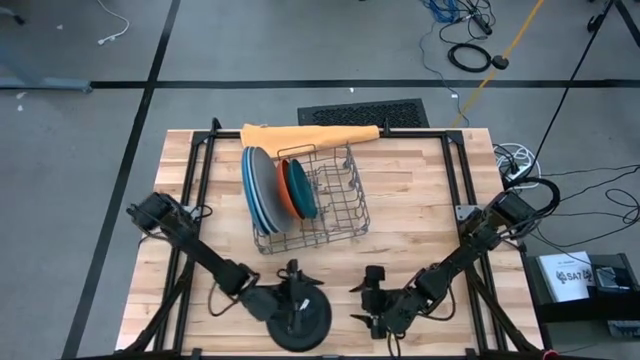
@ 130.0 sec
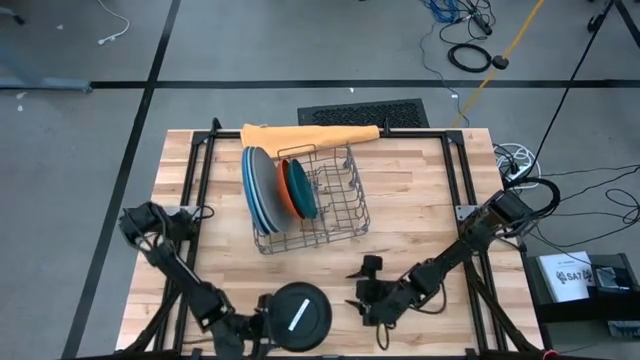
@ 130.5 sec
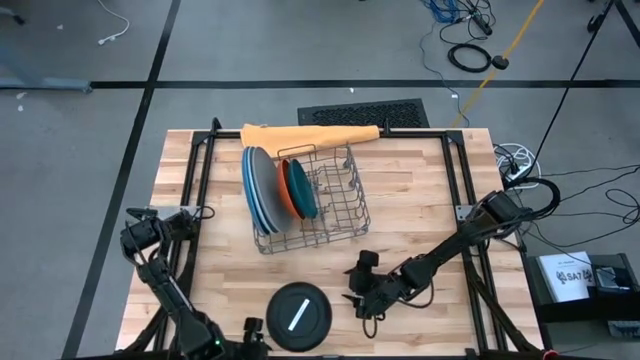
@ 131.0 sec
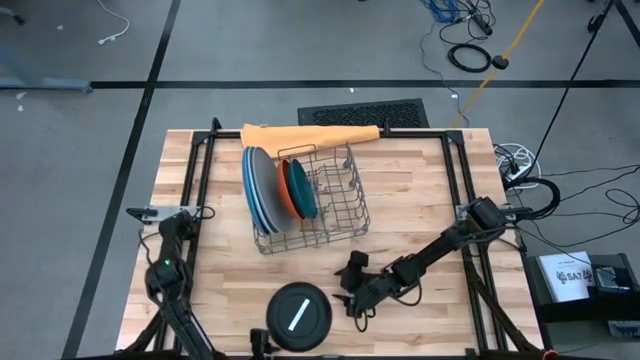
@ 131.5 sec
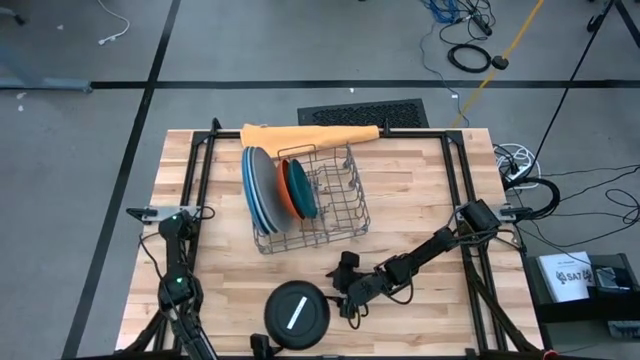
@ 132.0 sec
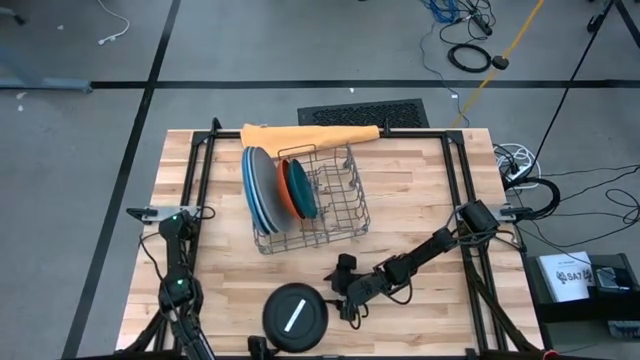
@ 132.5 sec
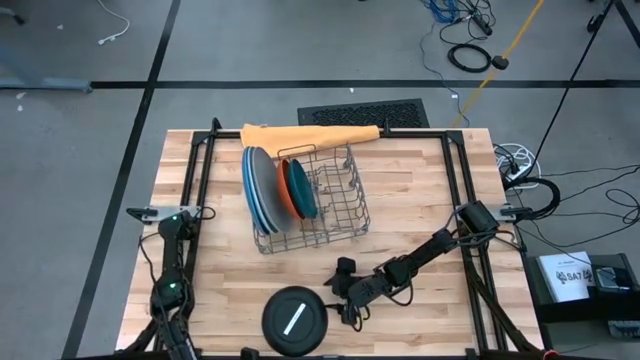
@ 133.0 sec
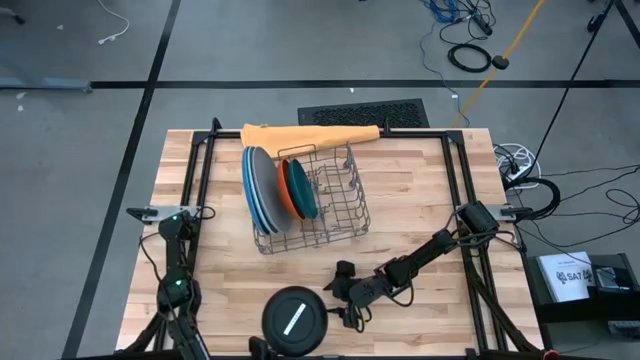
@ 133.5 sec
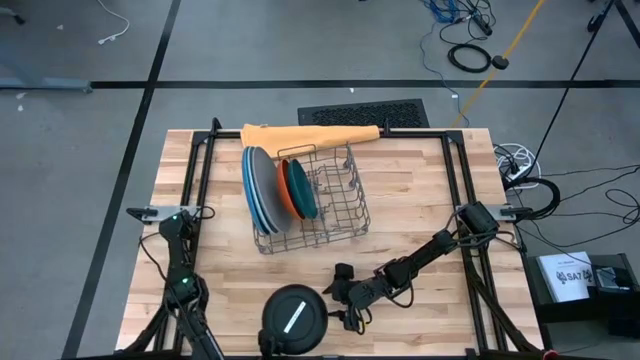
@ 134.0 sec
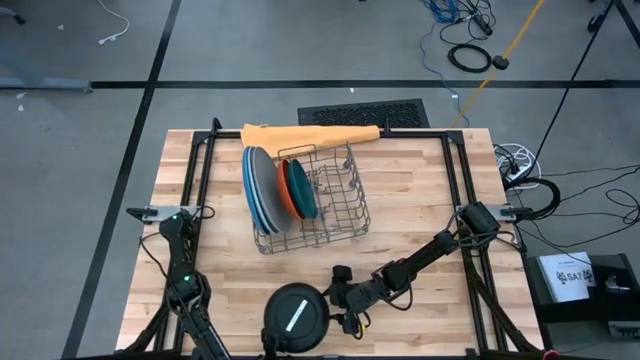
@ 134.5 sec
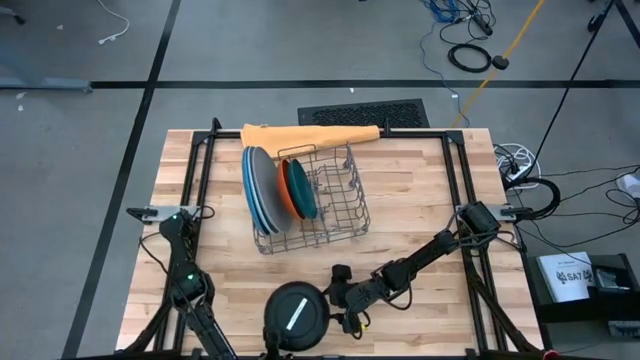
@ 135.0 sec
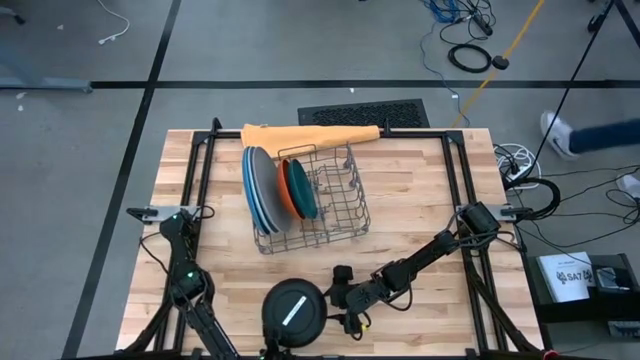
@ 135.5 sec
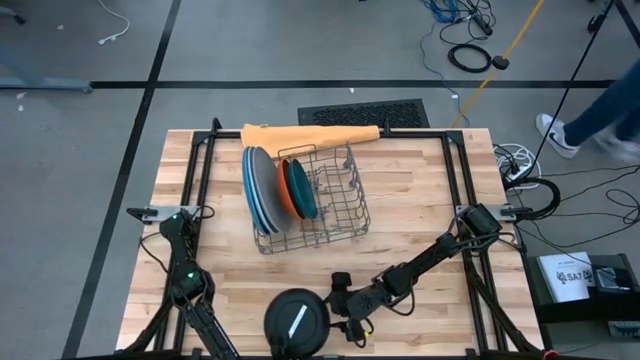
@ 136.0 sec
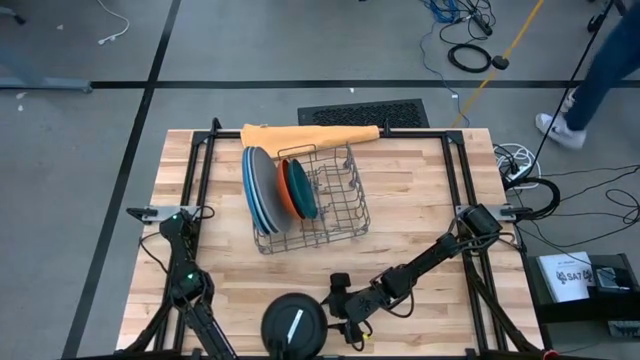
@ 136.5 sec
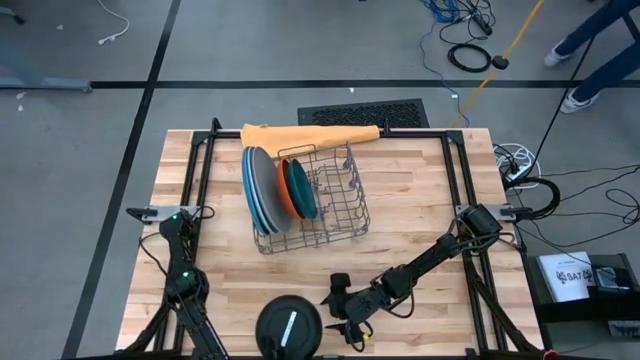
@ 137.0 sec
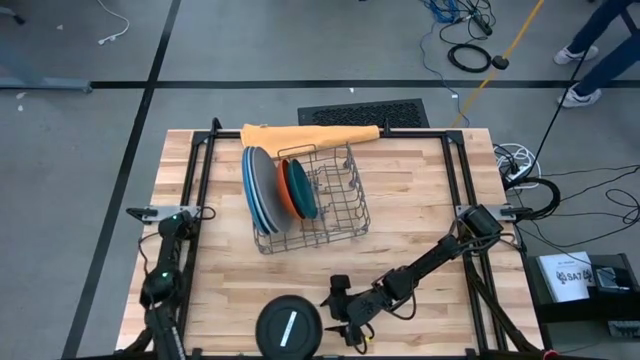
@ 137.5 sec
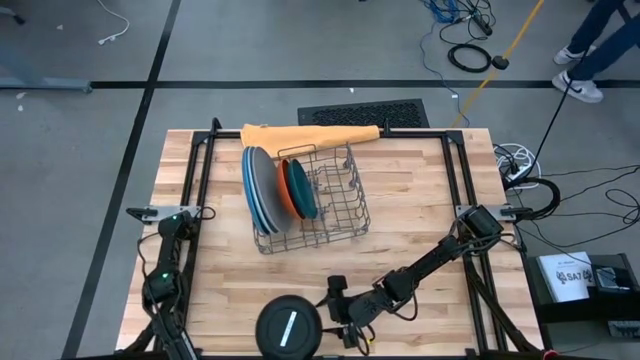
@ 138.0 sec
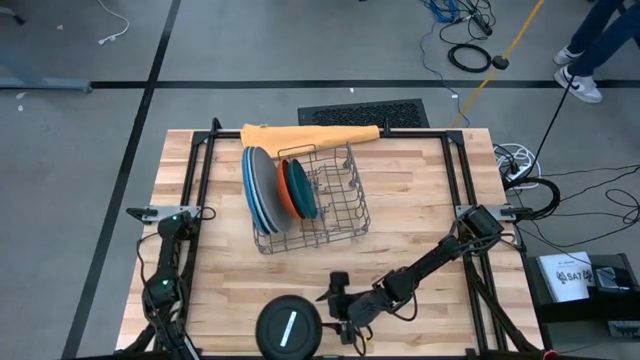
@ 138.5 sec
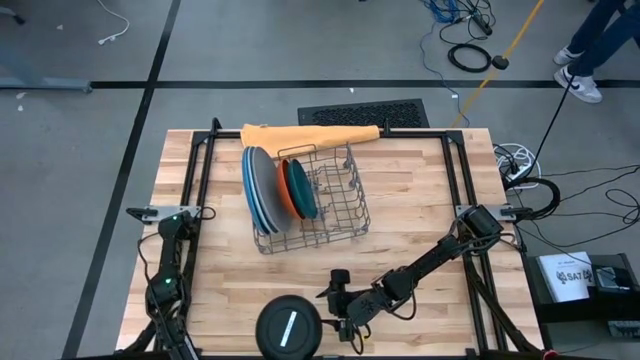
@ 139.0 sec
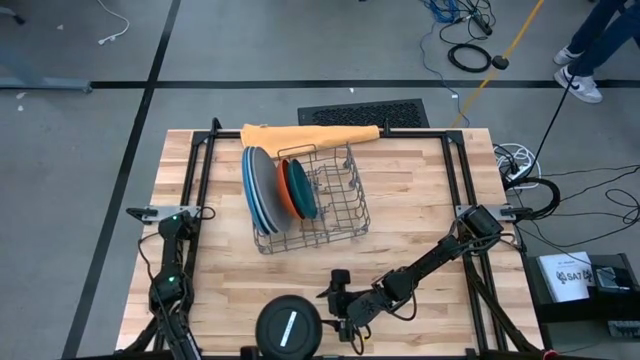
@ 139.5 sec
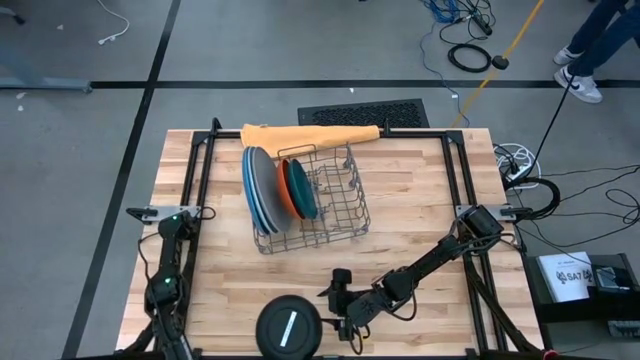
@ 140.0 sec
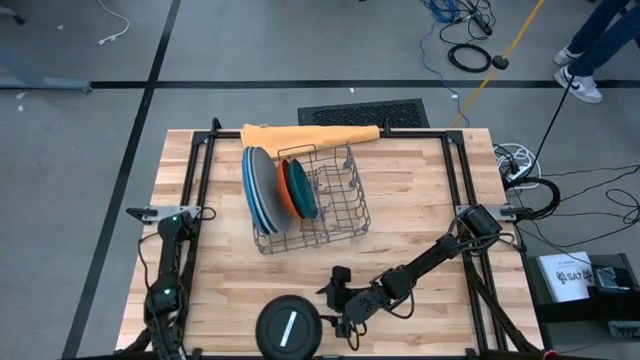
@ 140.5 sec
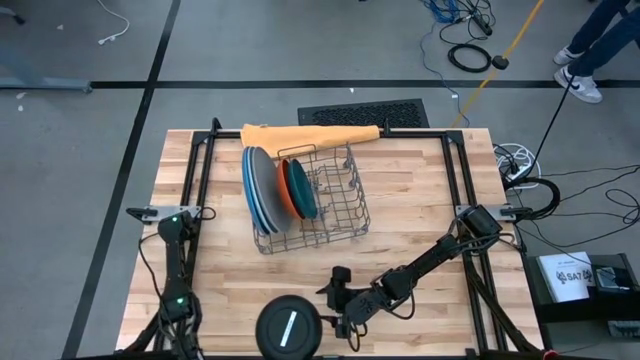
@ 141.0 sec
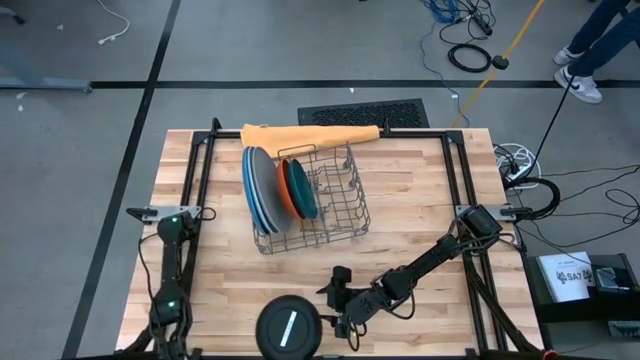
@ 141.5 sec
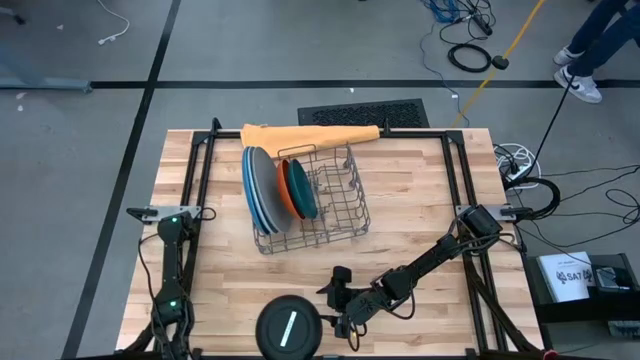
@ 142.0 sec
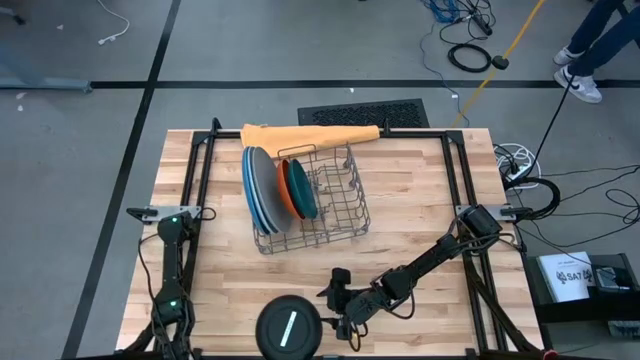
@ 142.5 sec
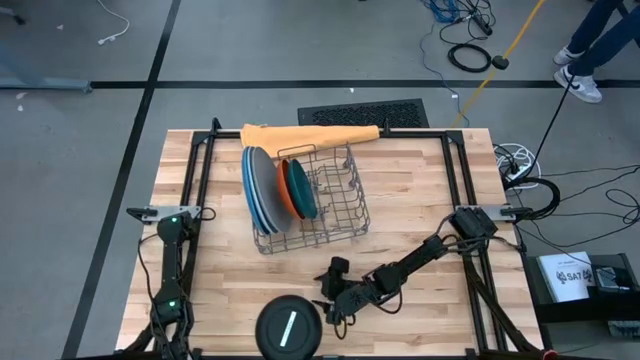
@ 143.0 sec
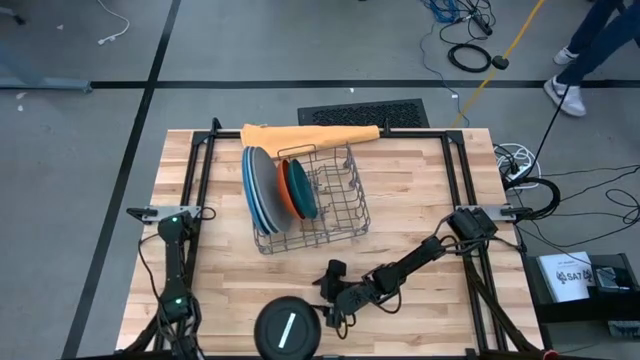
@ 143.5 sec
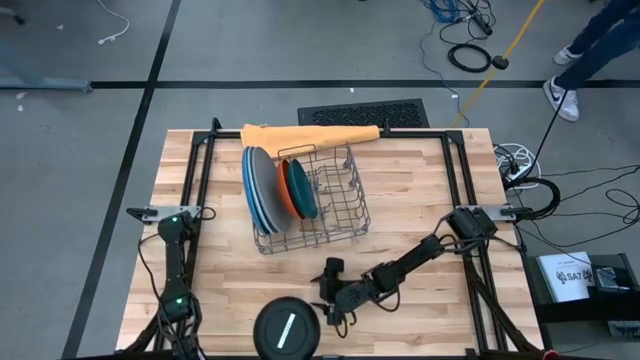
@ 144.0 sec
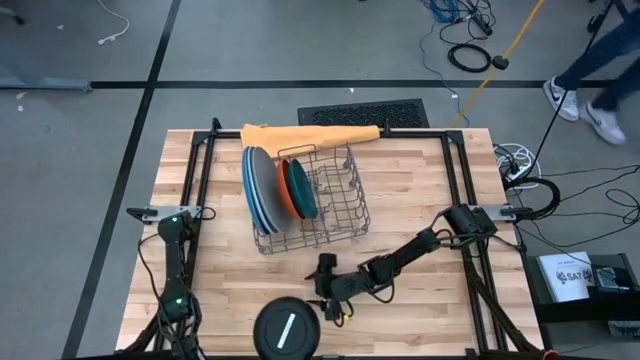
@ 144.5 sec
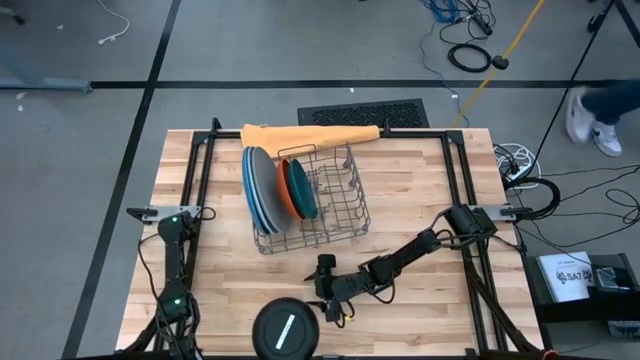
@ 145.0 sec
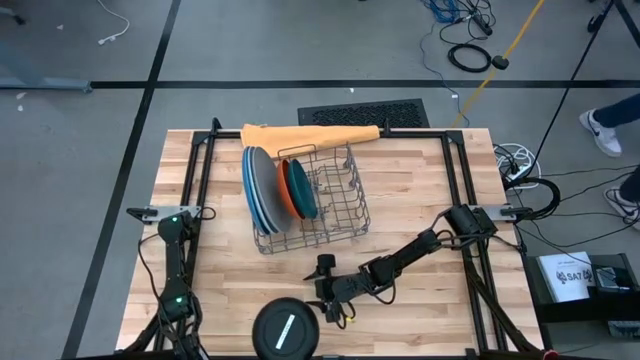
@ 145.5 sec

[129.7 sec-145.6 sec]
Task: Sort dishes
Put the black plate in the dish rack

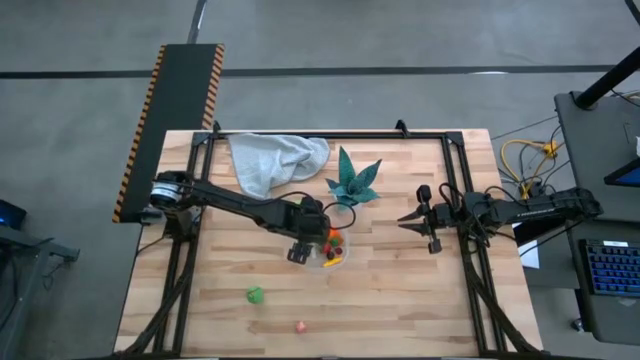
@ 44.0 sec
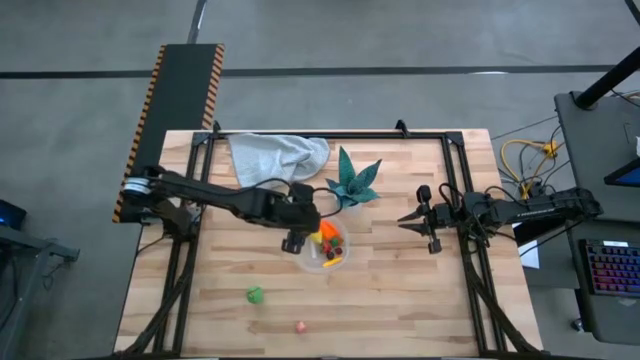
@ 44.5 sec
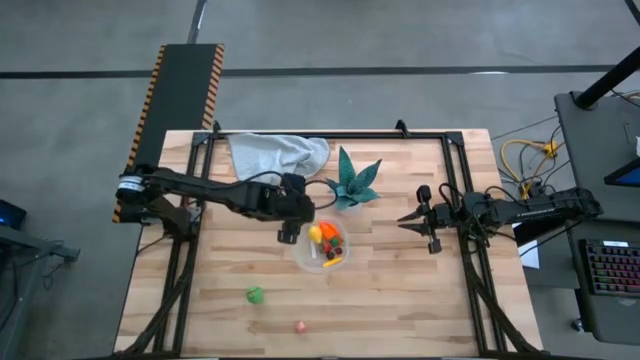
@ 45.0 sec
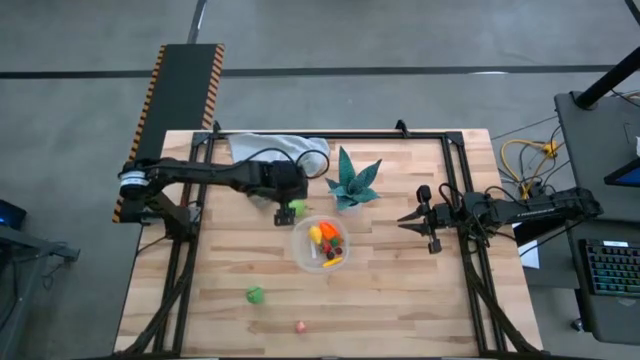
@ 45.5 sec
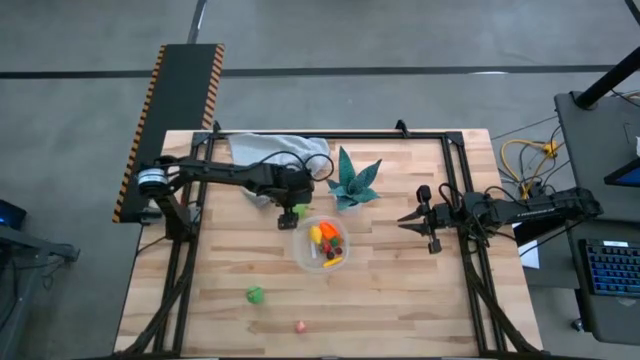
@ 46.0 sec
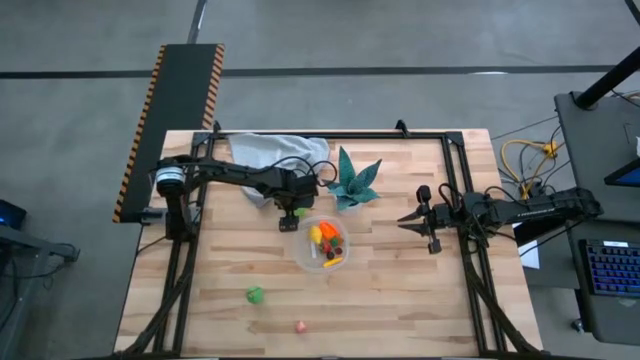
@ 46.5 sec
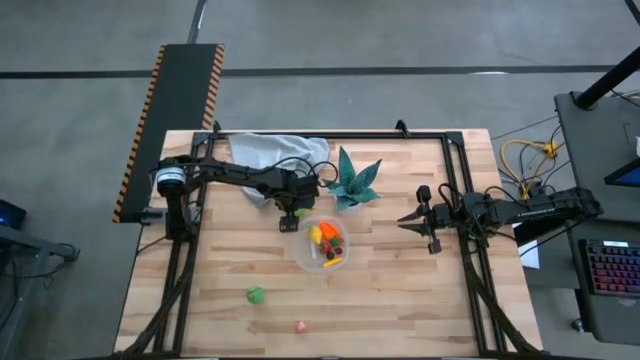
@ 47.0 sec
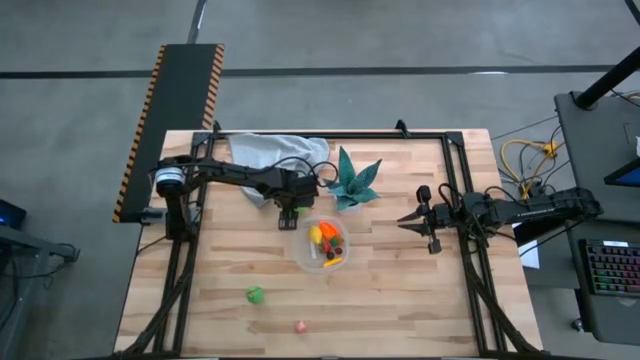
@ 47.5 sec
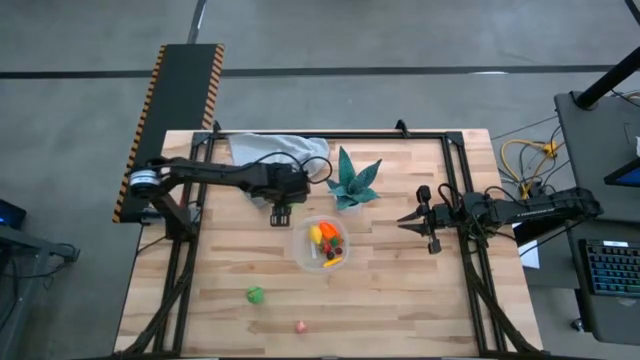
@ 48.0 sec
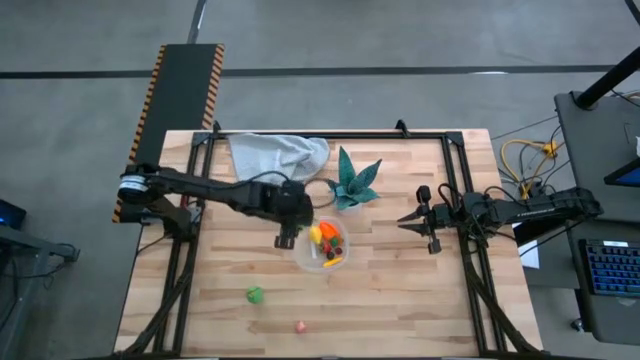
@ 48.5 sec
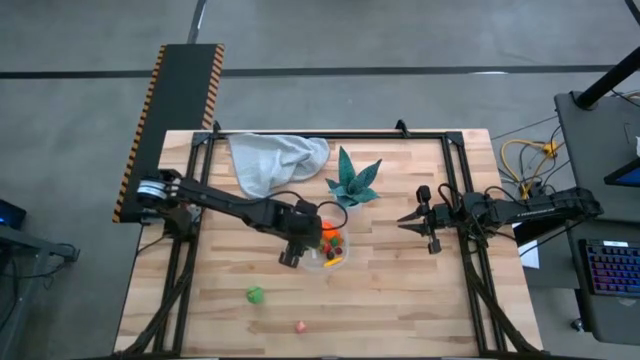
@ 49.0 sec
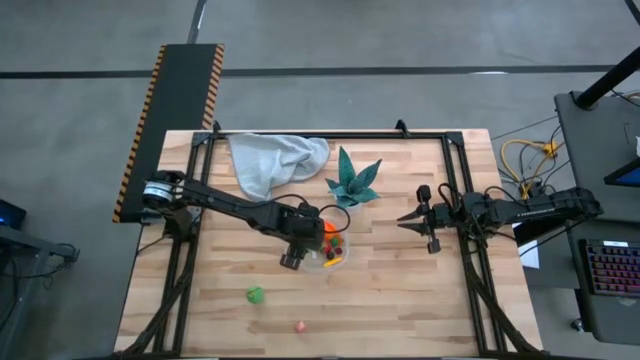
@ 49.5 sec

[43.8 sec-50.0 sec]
Task: Pick and placing Produce into tupperware
Put the avocado into the transparent bin
